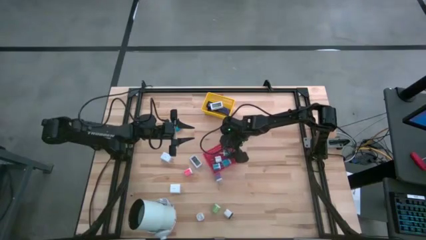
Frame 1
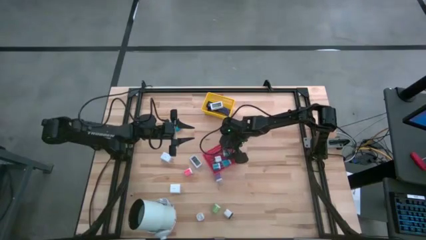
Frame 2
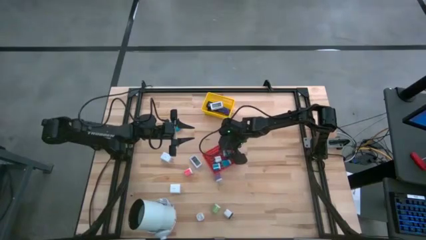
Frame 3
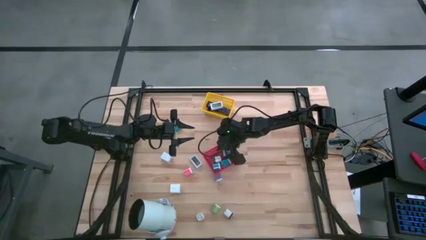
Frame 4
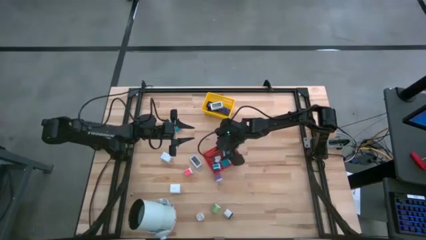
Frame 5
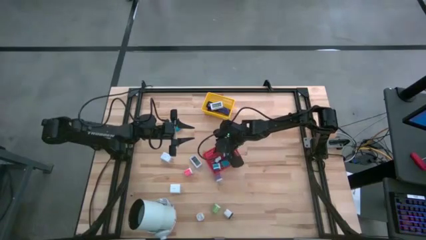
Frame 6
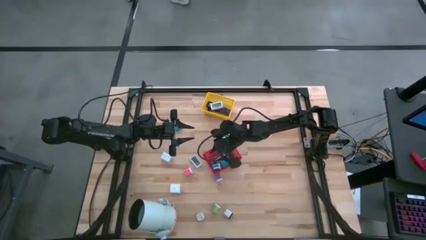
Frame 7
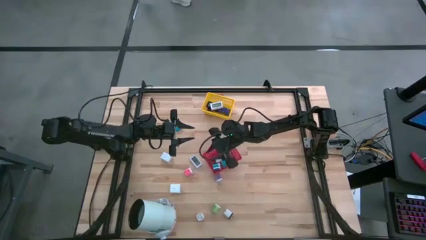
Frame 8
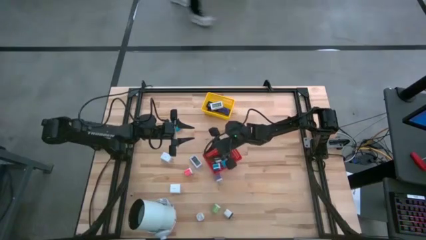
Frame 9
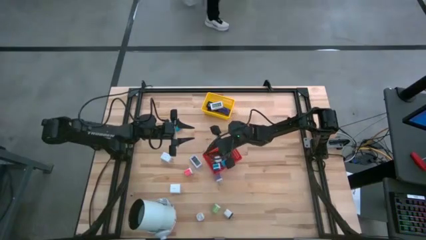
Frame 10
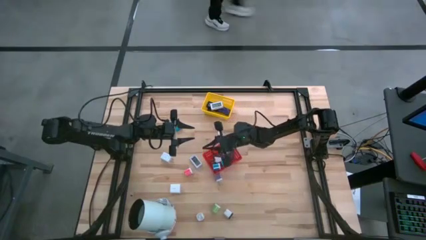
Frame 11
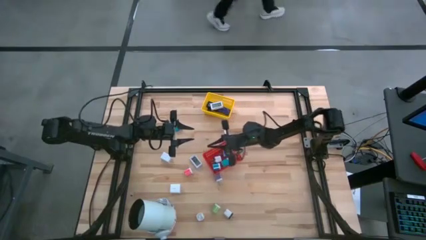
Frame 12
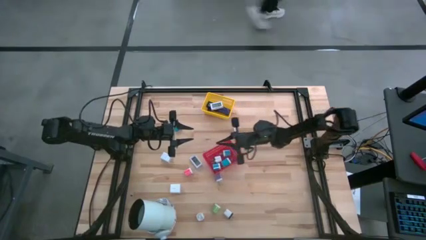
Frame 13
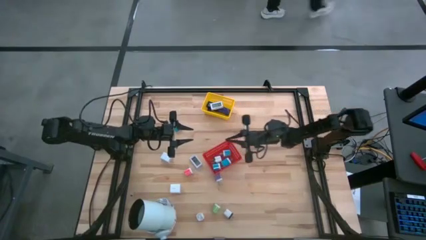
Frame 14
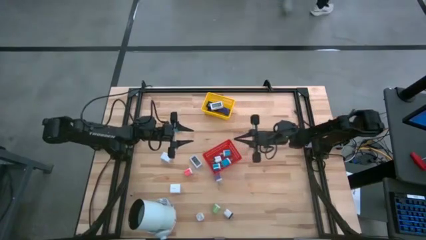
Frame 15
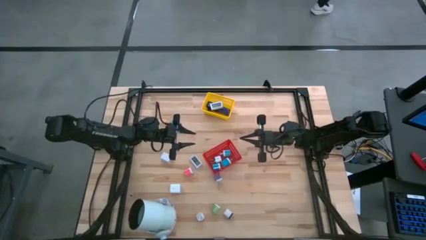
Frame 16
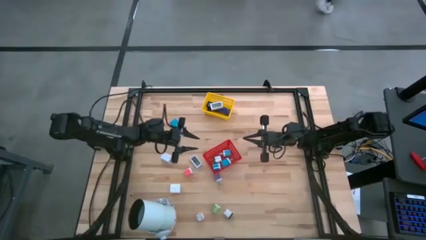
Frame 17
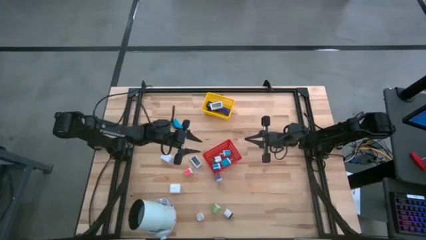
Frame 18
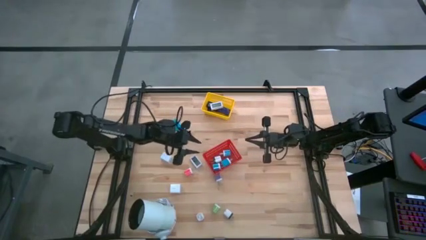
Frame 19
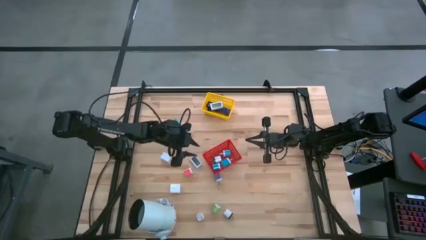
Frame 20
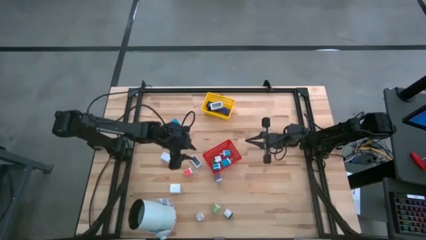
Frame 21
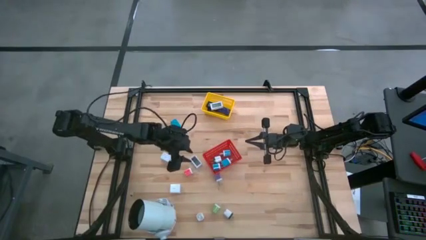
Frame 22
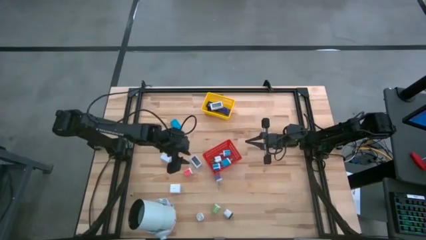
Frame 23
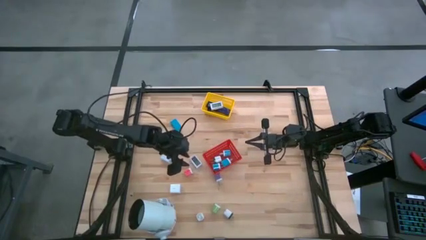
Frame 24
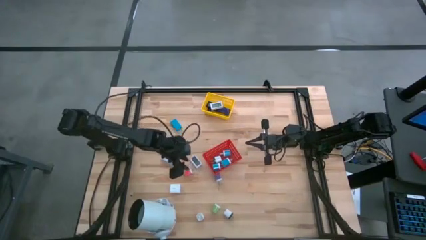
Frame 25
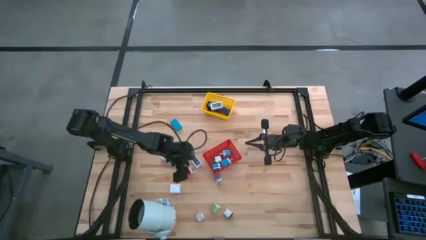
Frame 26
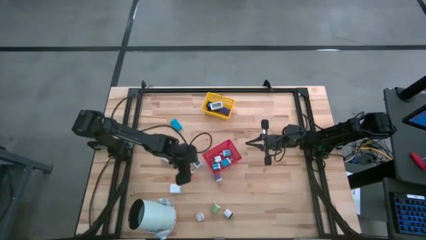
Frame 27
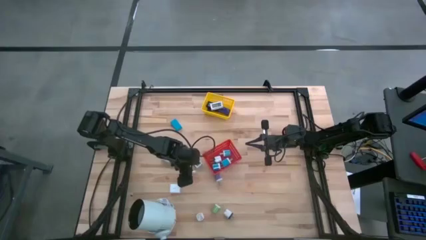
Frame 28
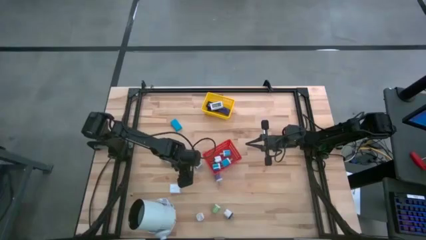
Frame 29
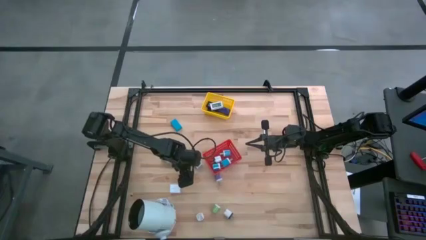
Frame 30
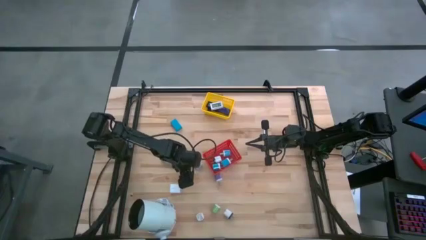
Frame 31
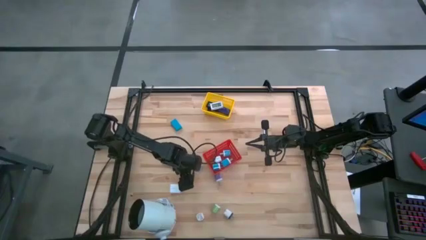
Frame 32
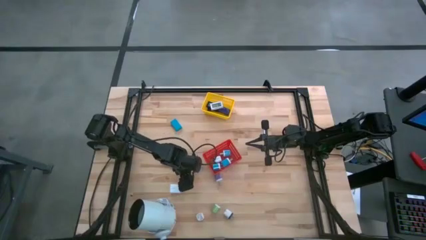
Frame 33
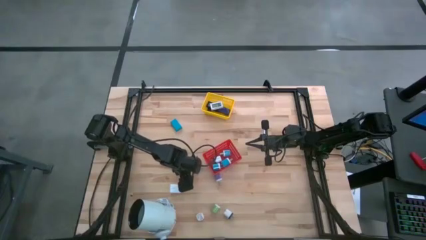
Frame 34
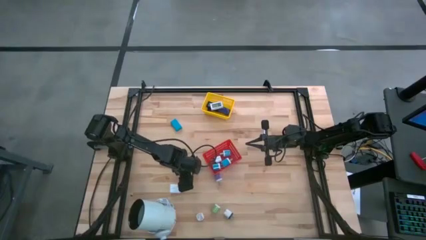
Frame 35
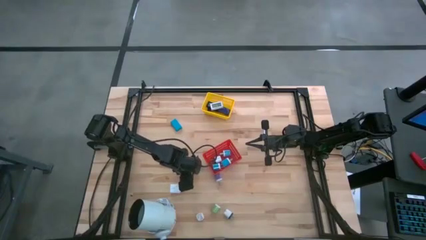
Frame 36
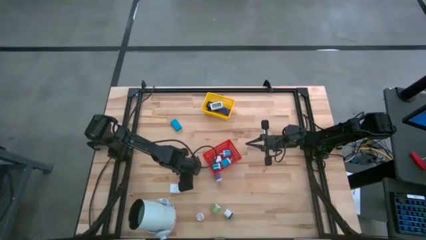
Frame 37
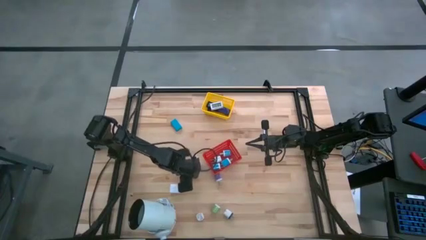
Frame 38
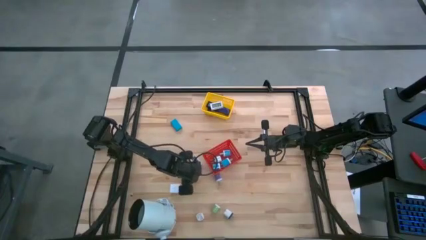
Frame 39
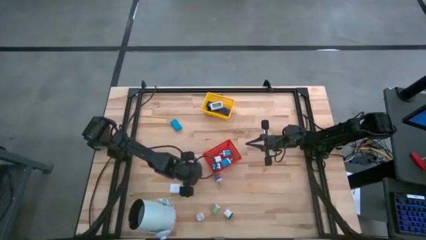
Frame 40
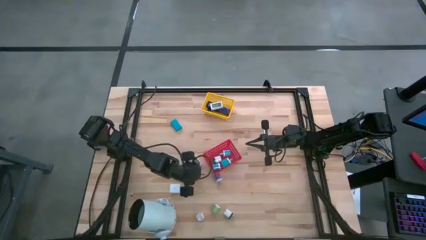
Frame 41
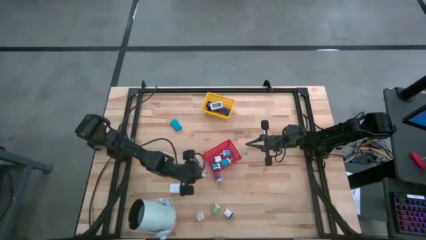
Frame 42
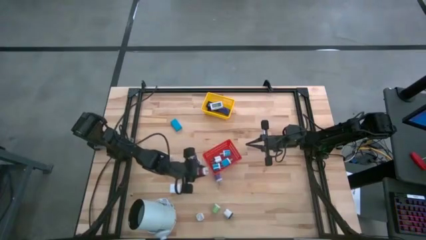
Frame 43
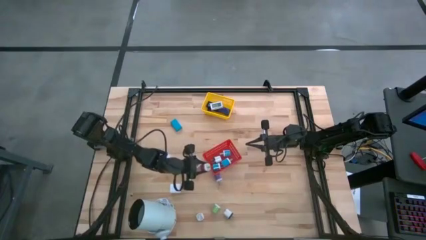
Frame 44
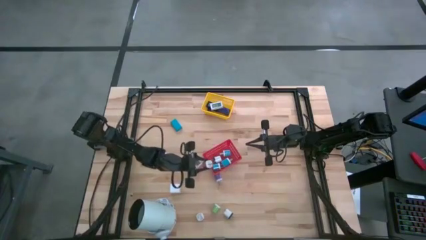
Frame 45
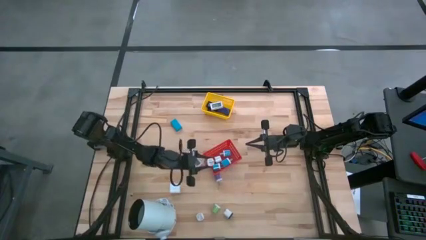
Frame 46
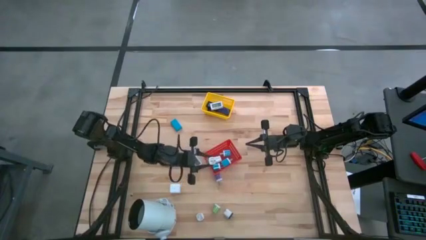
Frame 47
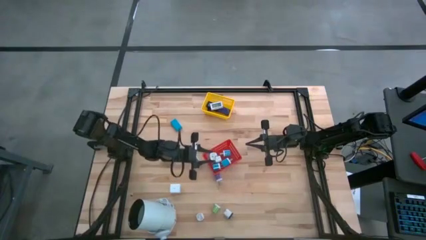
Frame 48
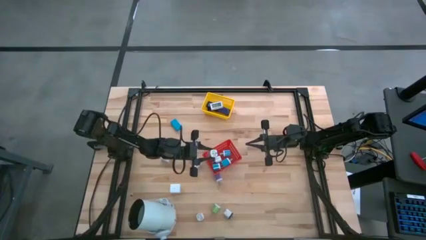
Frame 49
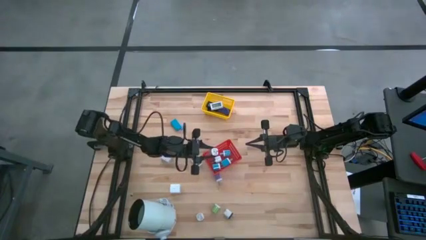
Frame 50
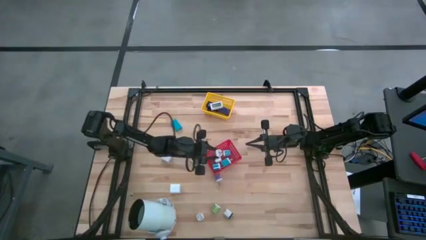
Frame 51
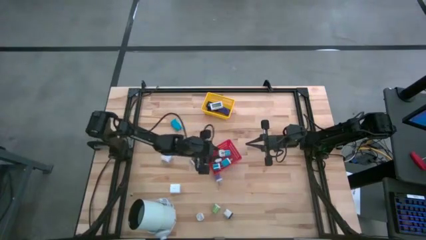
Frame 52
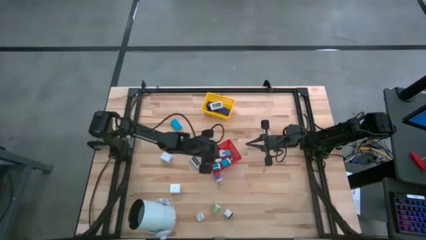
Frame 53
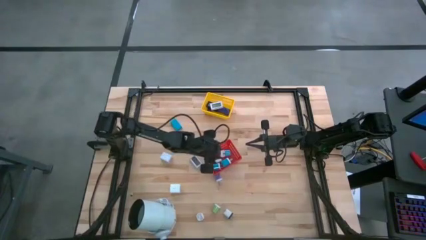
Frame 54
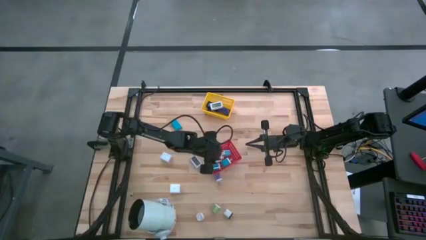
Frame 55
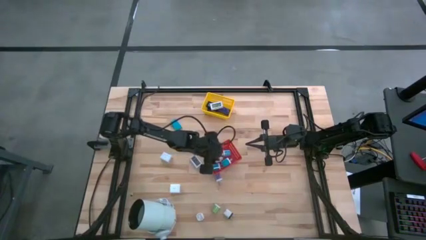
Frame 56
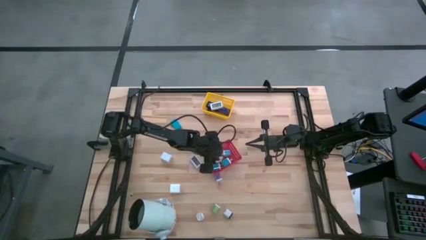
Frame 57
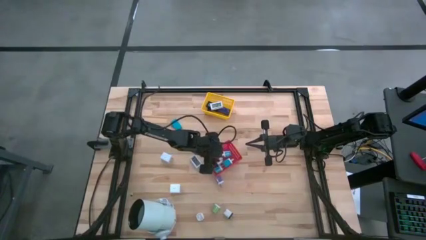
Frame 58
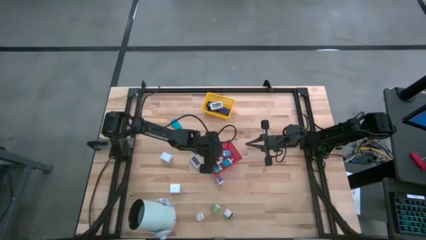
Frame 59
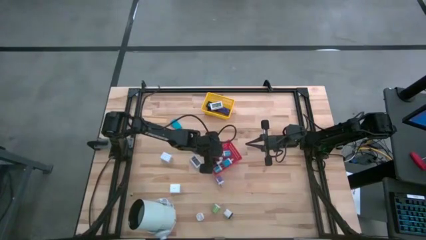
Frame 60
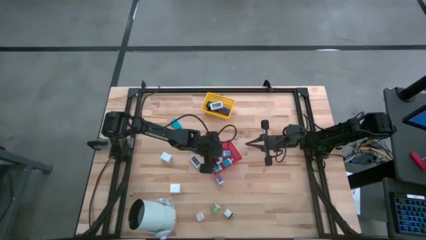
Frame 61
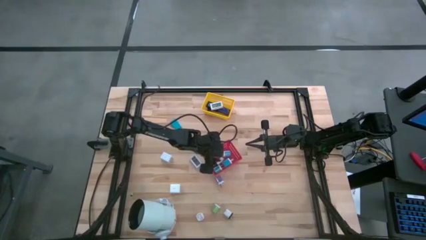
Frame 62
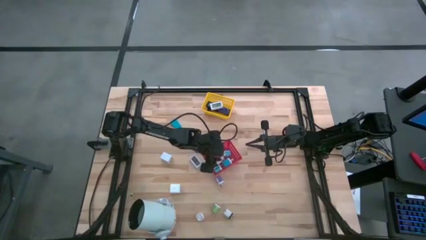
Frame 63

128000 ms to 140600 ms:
Task: Pick & Place Office items
Put the top pink and white charger adapter into the red bin

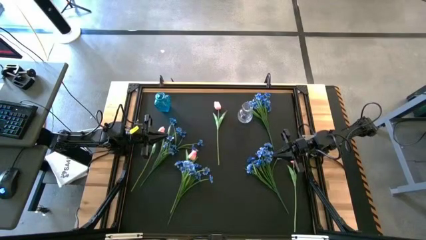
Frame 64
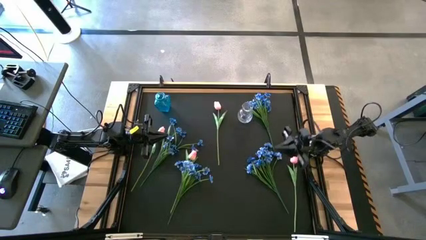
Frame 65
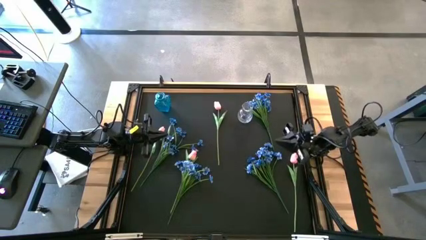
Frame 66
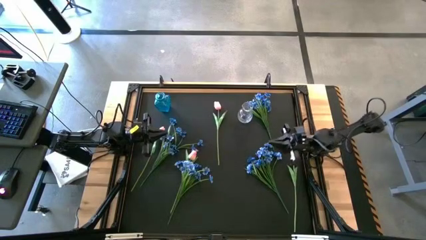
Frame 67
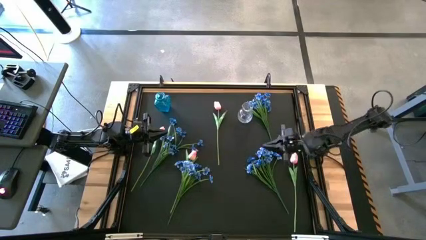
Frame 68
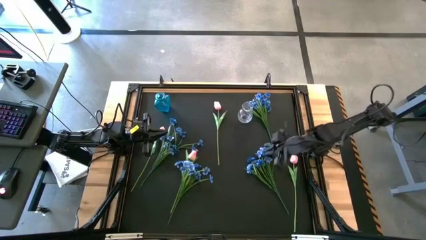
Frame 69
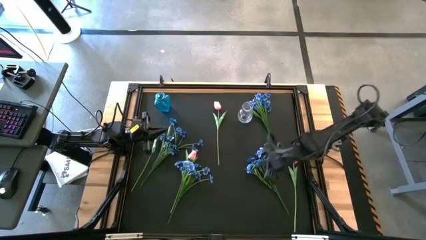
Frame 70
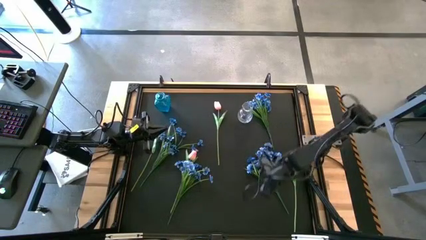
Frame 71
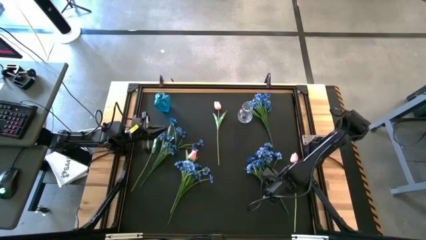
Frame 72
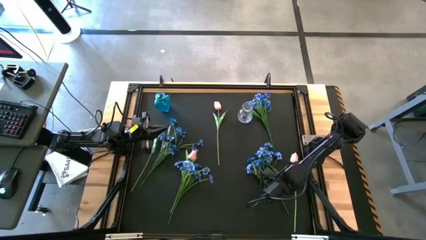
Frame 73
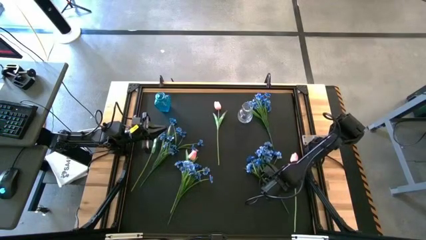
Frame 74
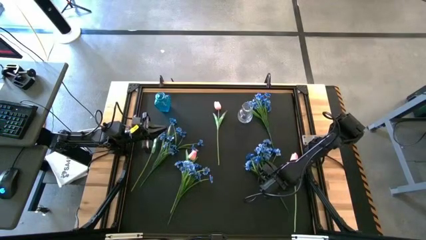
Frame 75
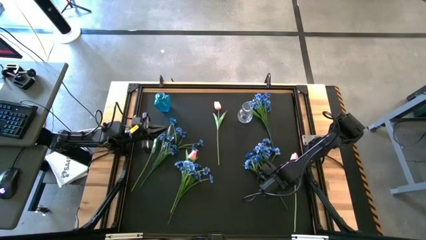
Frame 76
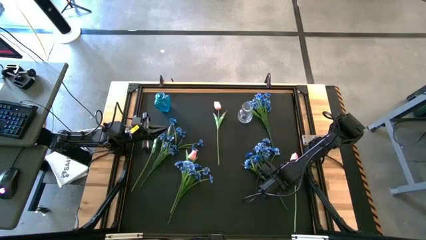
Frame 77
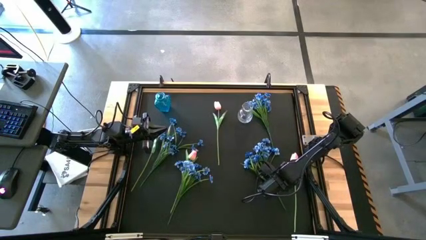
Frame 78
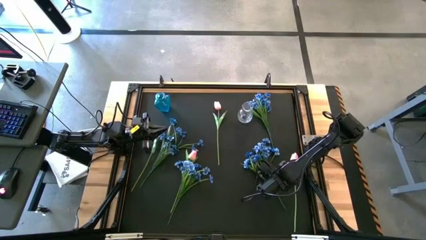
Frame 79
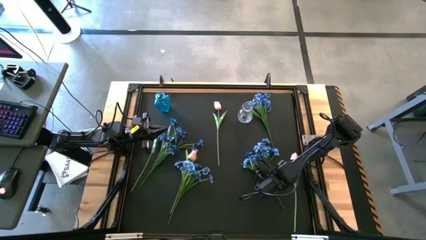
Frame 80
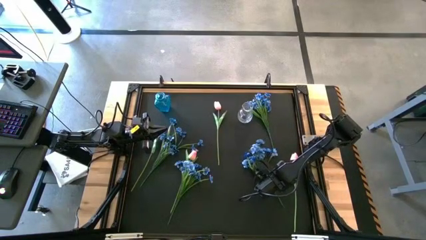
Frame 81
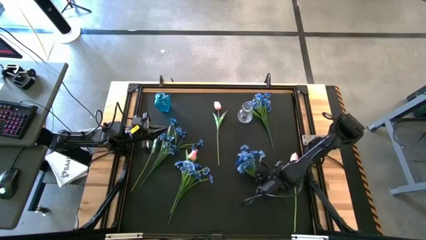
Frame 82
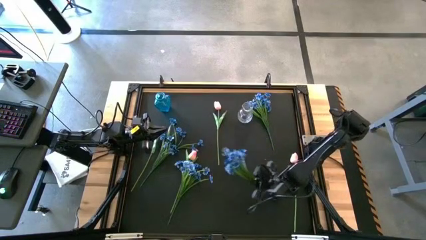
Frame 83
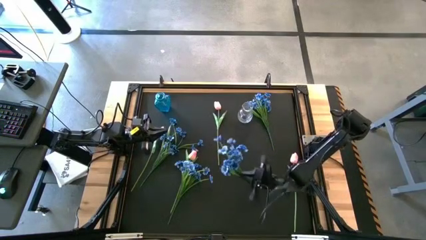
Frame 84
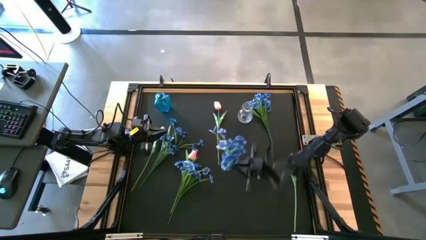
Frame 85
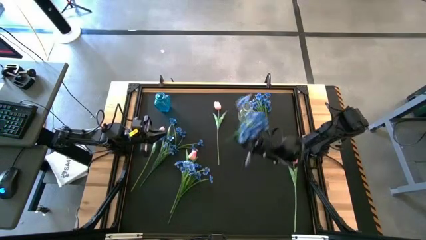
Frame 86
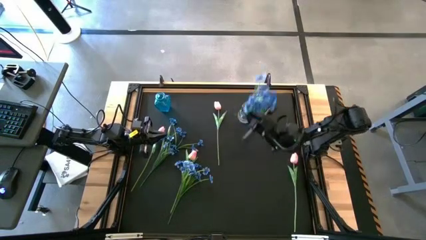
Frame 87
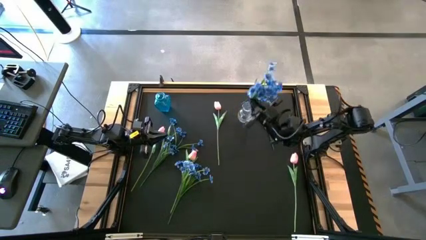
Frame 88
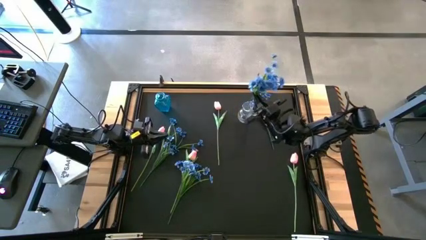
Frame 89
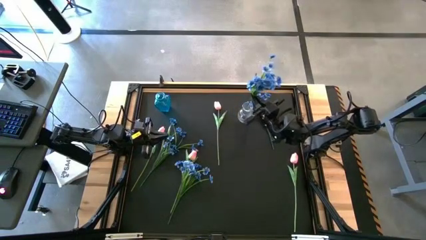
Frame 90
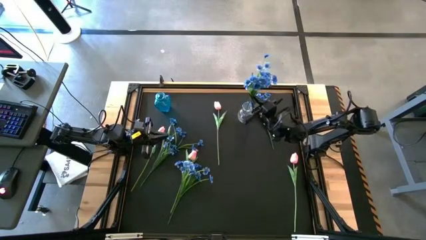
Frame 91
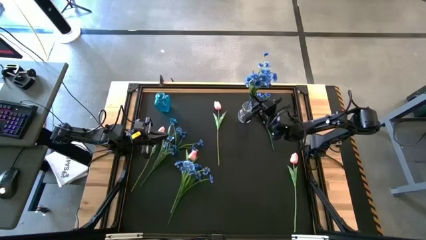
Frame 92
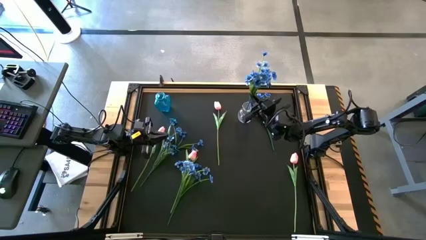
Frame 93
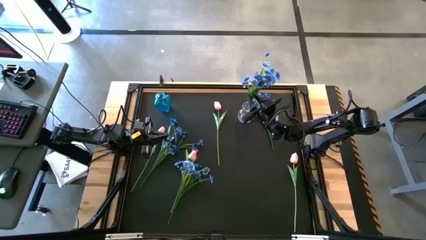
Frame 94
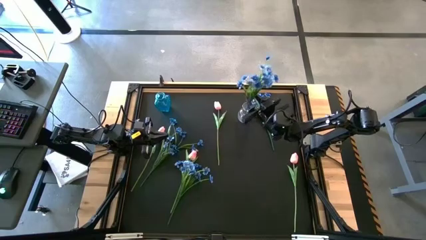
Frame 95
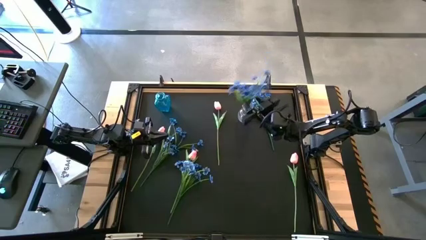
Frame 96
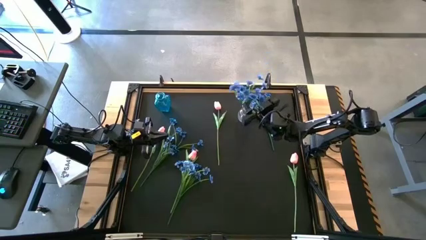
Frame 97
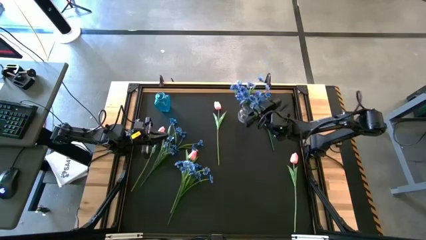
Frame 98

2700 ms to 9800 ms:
Task: Sort flowers into vase by color
Put the blue flowers into the transparent vase
